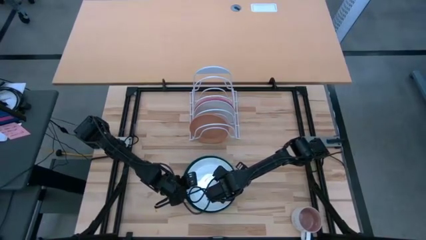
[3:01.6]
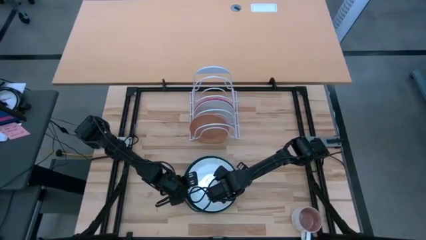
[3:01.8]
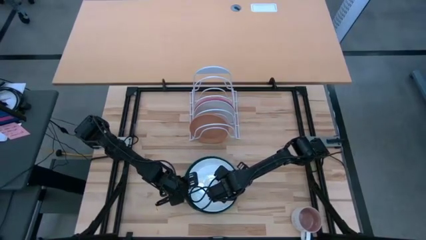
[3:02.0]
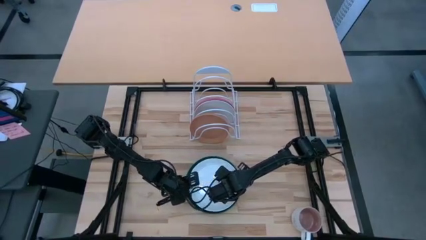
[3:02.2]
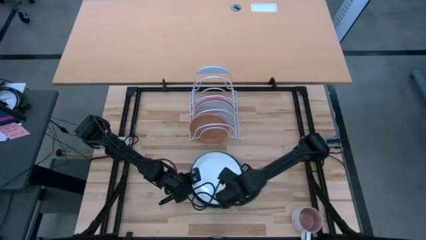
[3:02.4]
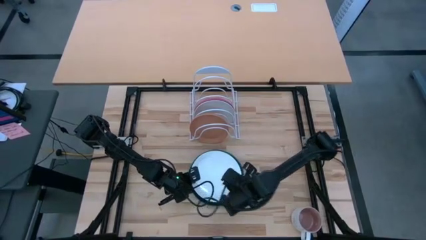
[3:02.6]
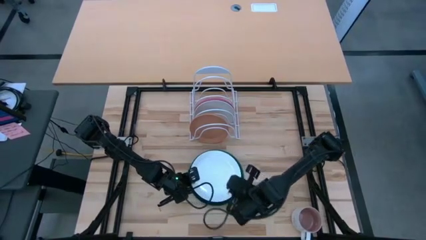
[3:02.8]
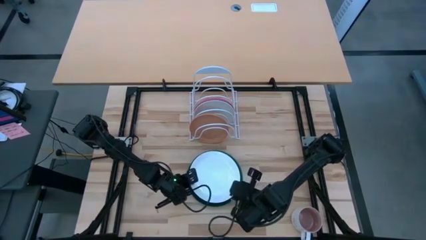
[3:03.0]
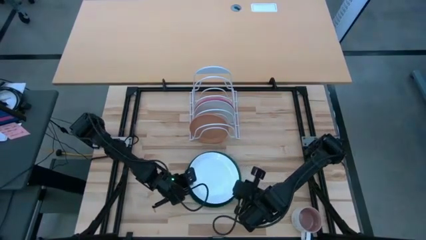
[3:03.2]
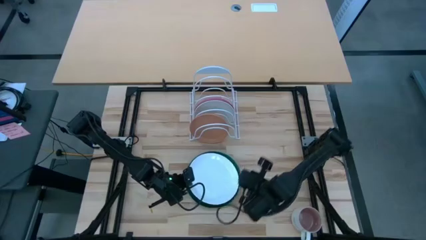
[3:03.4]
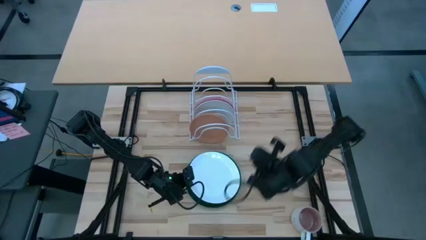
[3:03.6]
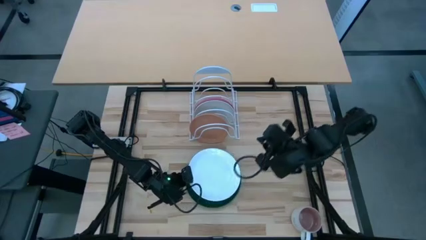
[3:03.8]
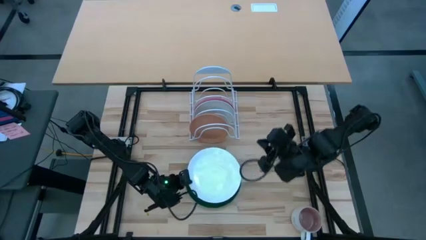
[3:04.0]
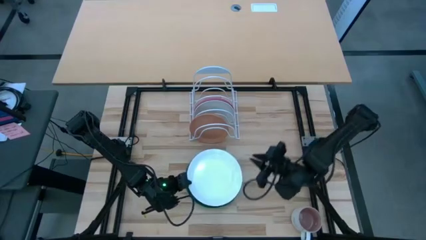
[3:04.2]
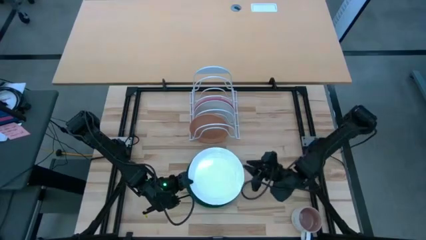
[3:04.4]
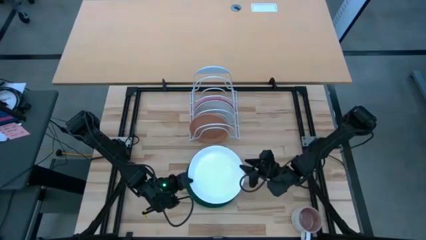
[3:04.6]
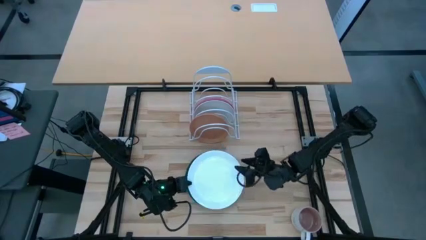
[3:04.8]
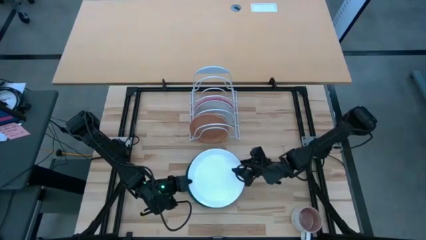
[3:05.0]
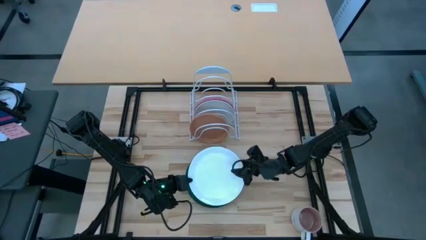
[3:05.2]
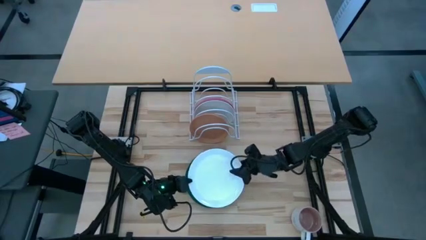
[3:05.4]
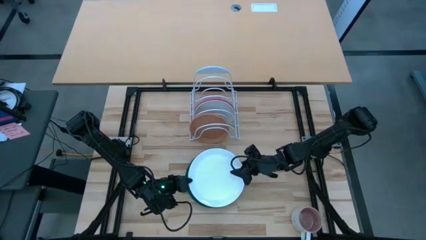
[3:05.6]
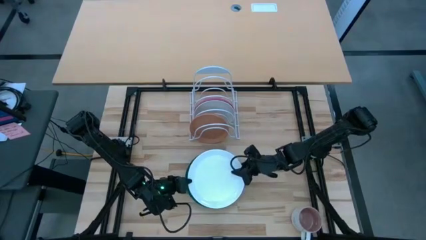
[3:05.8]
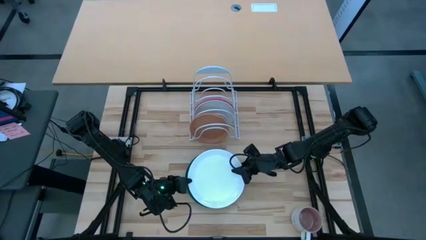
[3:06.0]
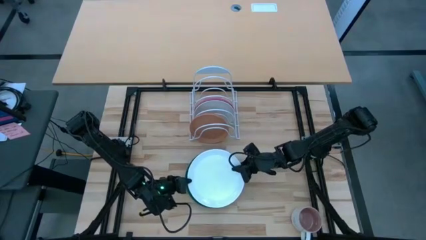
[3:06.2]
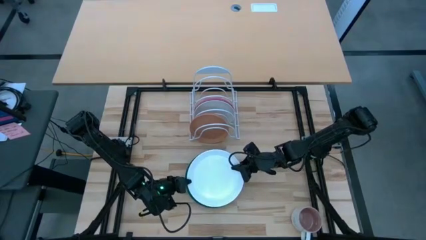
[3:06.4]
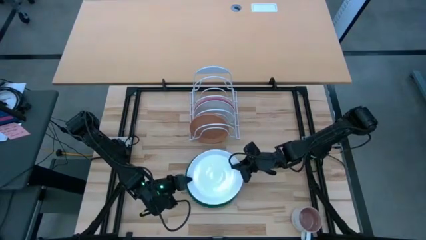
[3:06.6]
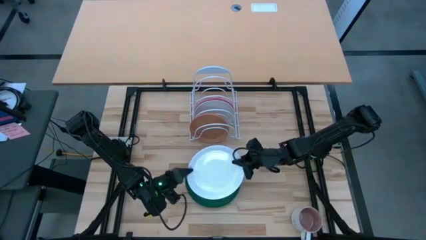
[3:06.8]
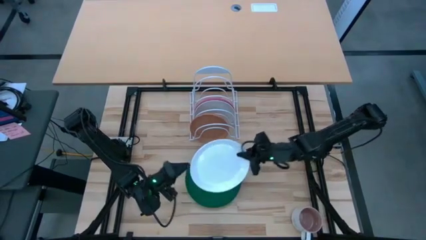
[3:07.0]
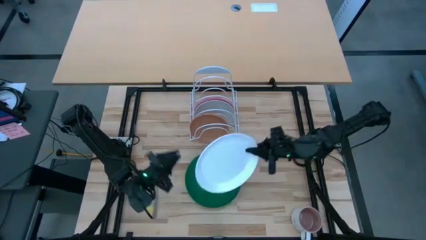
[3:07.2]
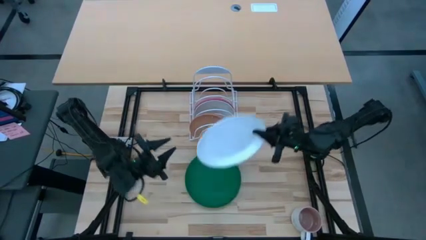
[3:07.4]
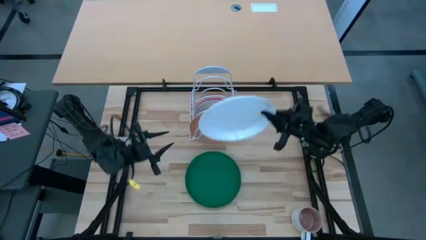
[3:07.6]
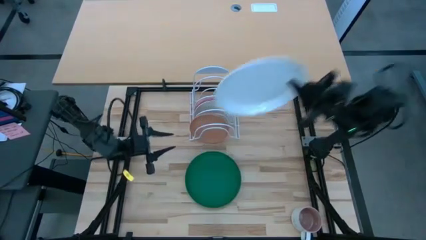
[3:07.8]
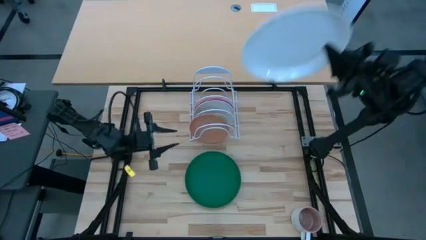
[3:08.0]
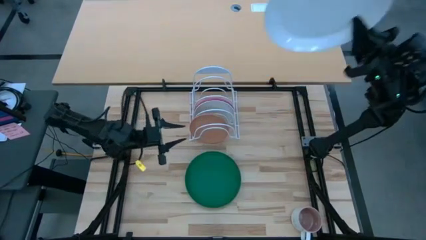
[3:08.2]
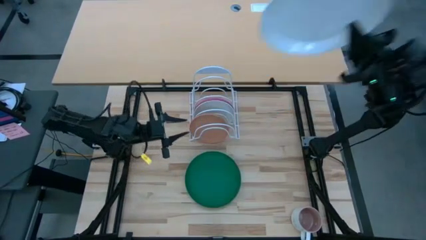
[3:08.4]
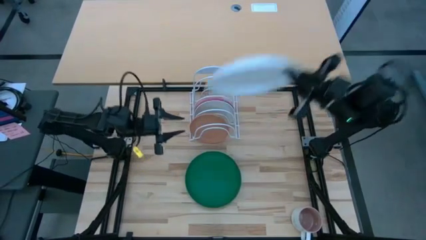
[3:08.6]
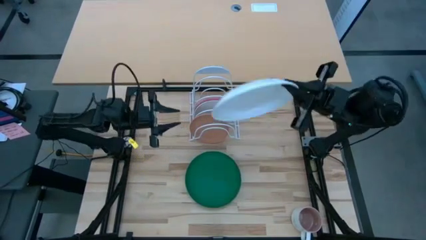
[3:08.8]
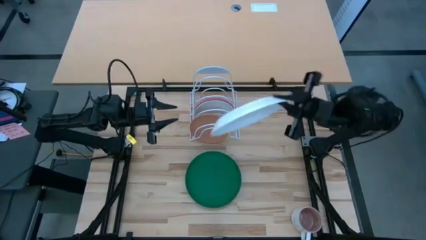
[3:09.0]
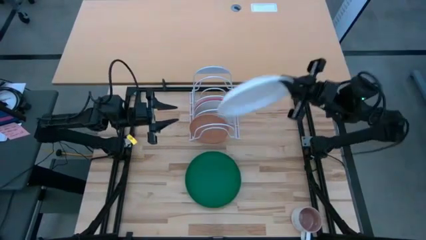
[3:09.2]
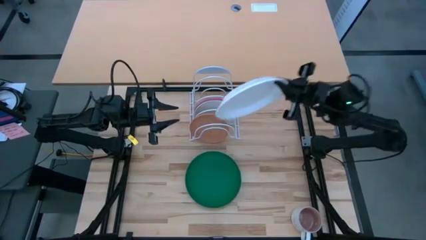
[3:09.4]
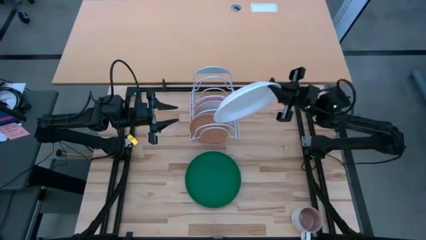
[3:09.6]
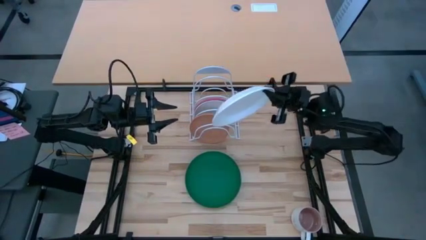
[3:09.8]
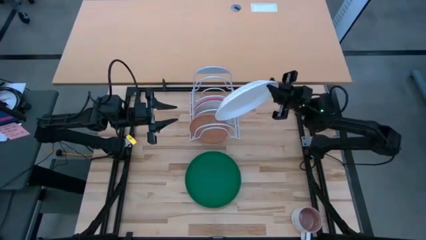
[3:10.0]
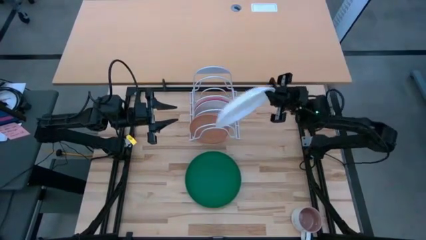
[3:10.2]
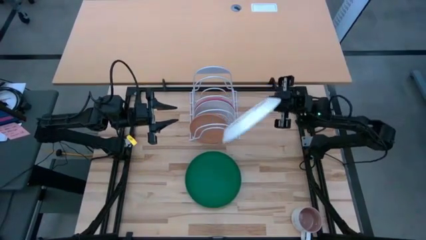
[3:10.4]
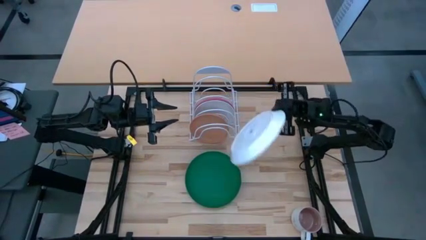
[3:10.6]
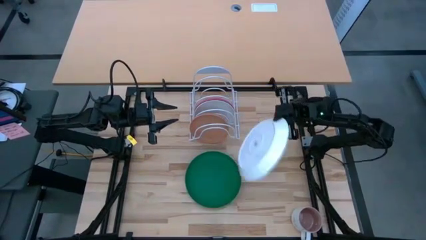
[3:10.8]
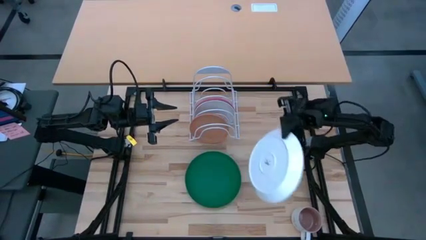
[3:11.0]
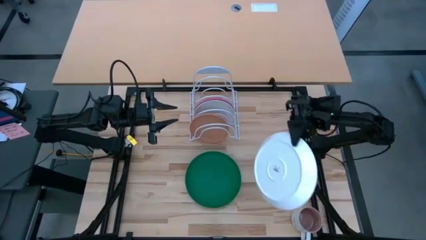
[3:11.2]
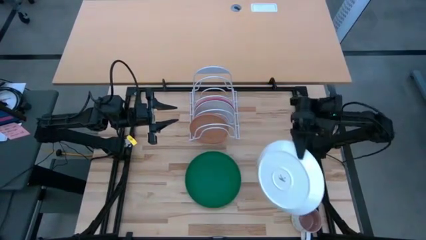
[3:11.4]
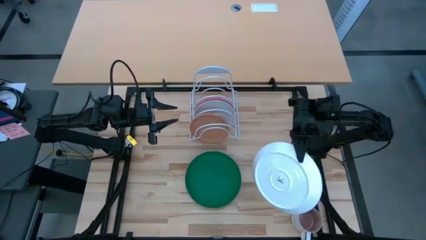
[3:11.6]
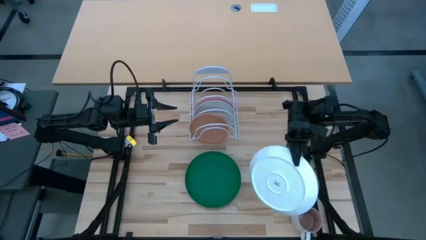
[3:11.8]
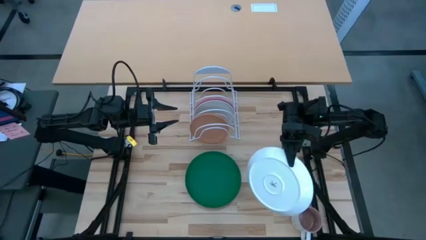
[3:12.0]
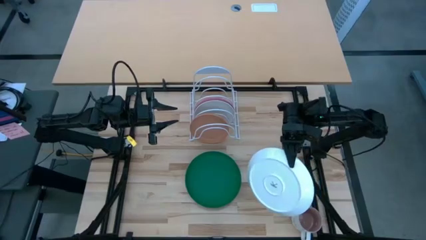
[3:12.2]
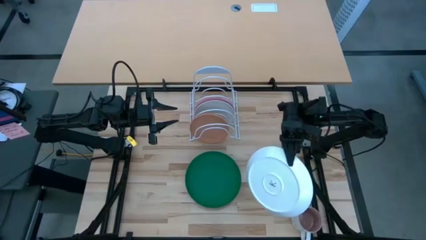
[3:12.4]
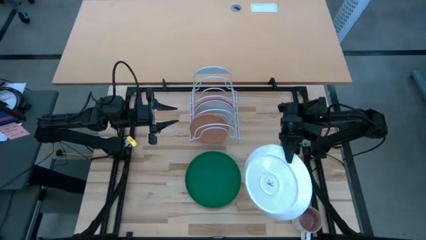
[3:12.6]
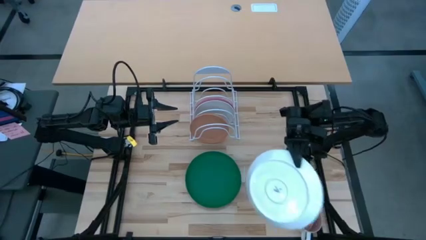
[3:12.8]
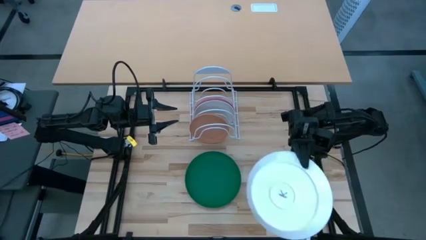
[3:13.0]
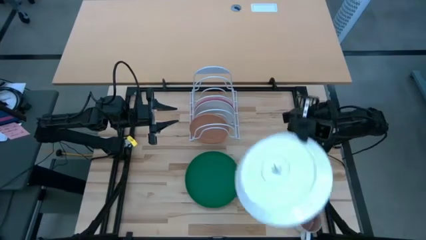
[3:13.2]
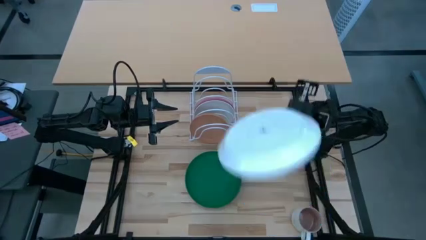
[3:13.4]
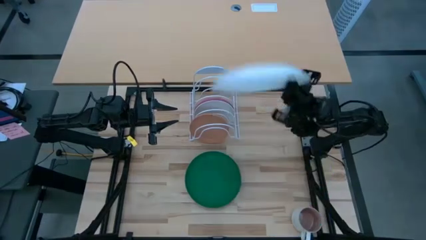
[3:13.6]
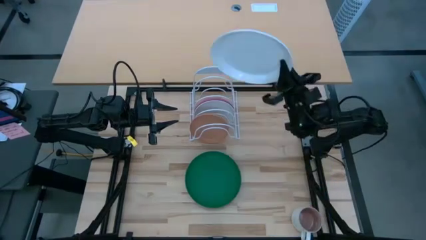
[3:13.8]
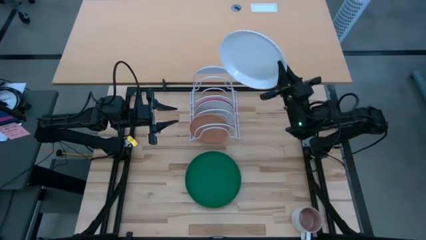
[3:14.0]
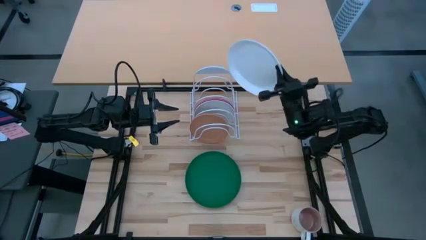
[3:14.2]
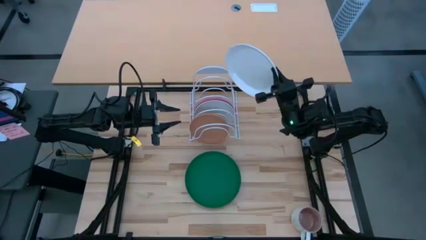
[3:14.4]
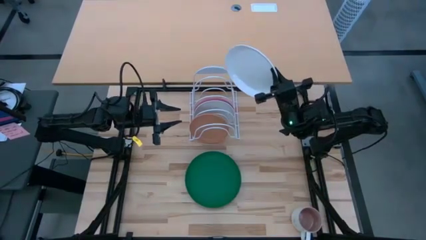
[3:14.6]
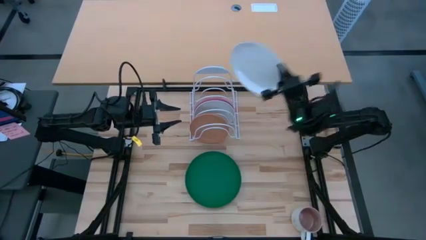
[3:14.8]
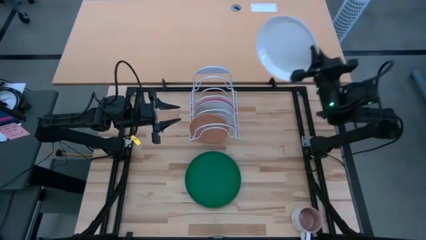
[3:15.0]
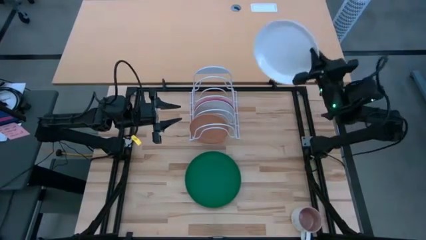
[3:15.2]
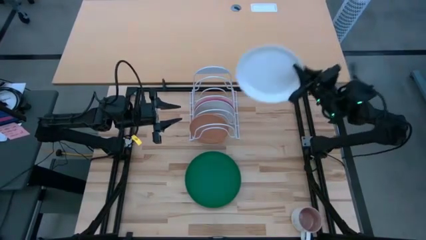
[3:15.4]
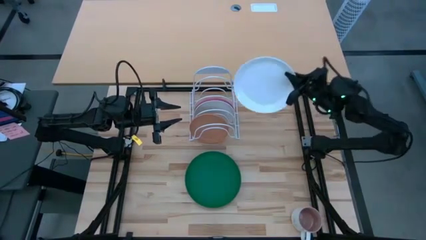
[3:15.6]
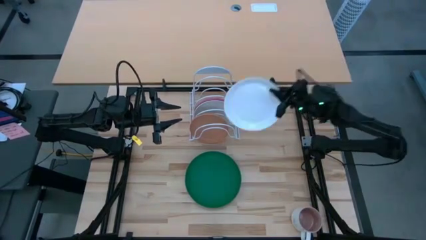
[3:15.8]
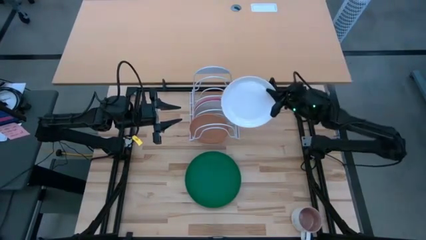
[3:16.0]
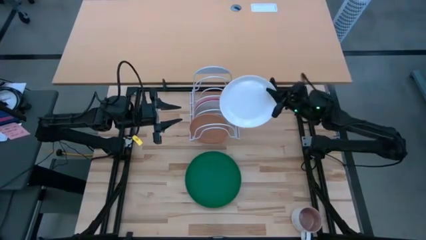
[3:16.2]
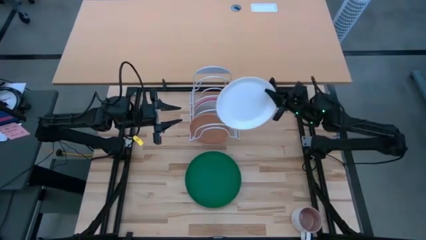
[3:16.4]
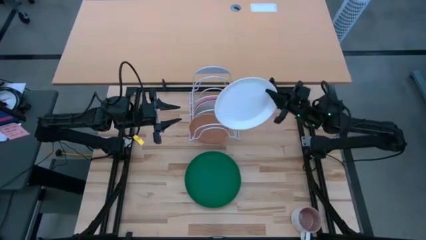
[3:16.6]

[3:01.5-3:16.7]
Task: Sort dishes
Put the white plate on the dish rack
